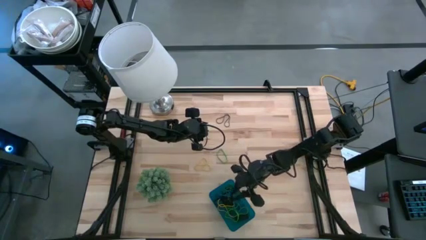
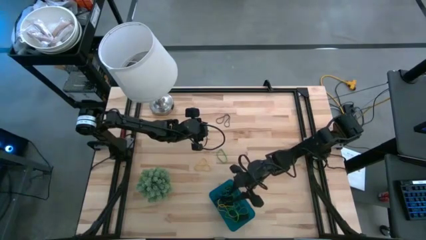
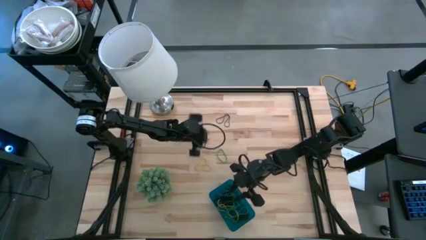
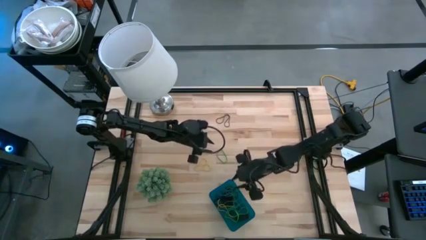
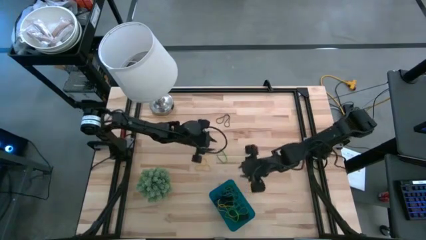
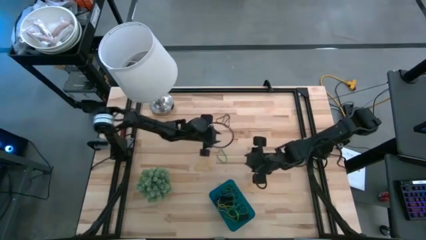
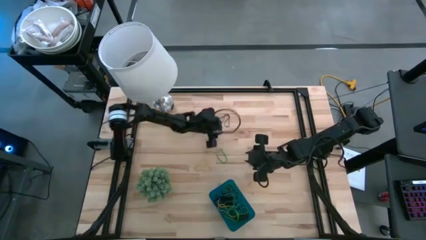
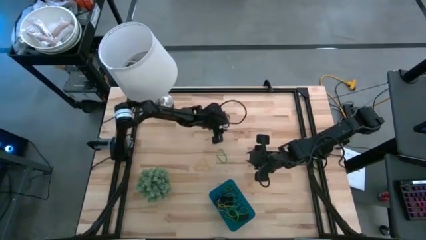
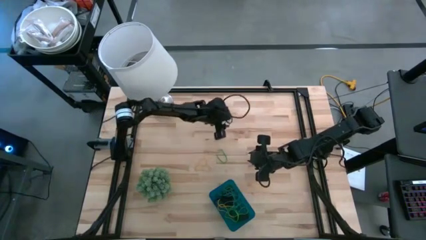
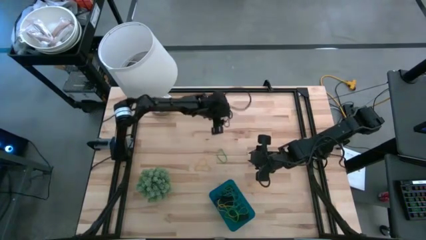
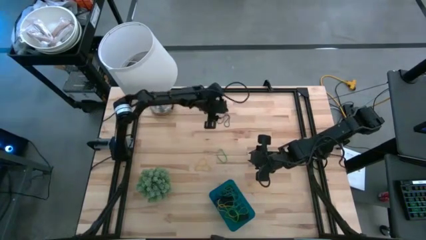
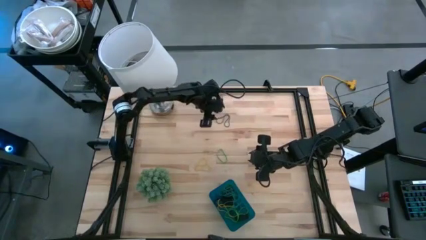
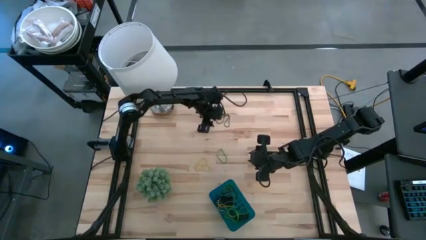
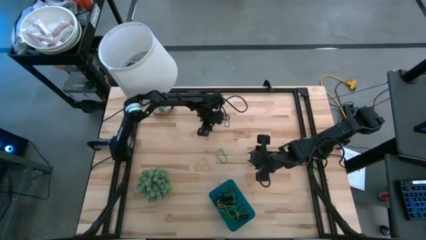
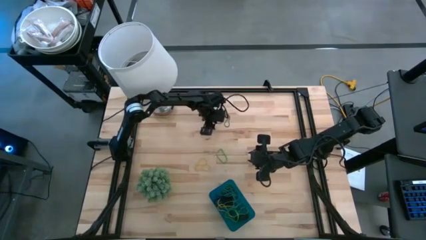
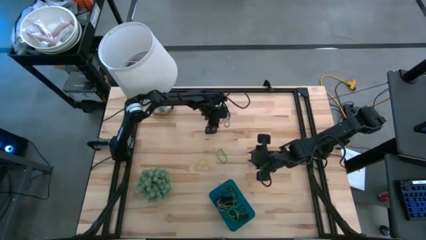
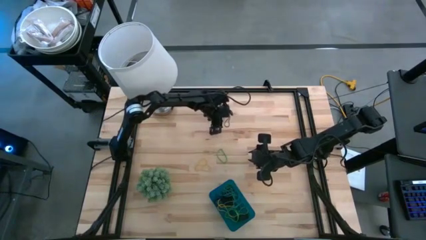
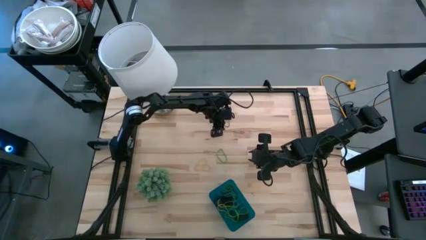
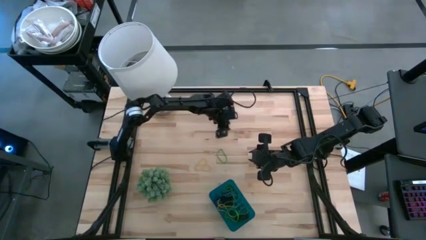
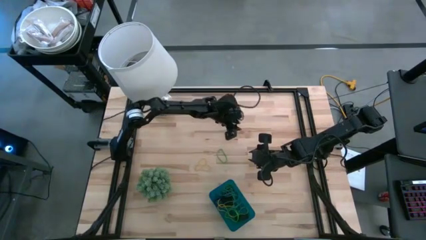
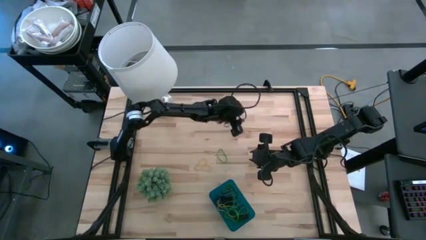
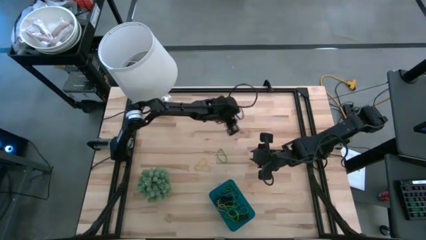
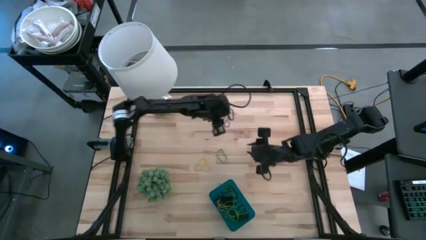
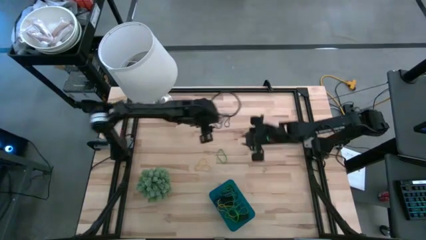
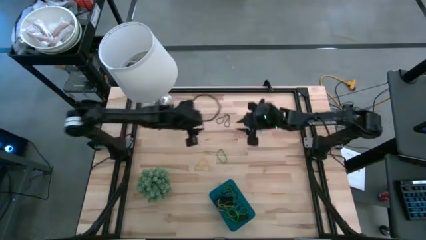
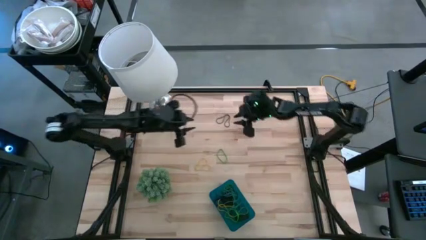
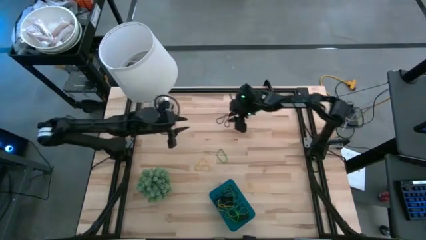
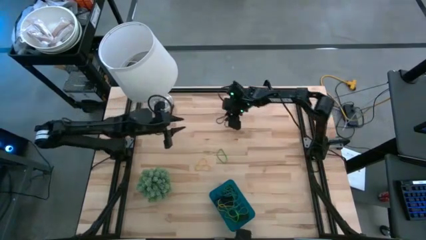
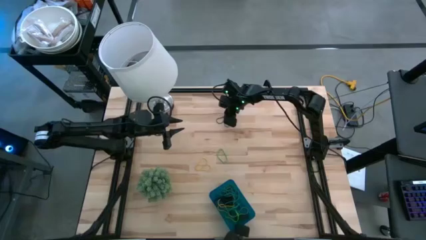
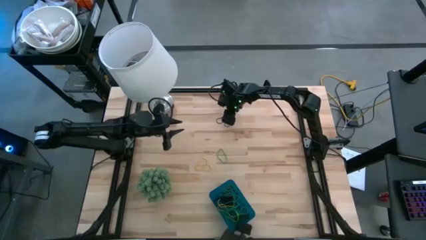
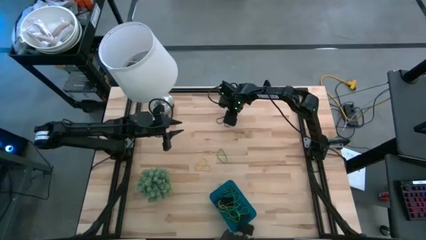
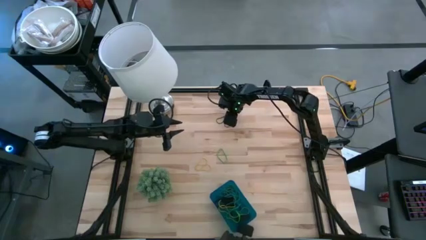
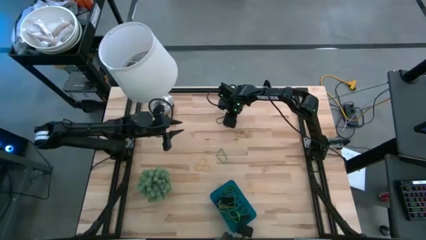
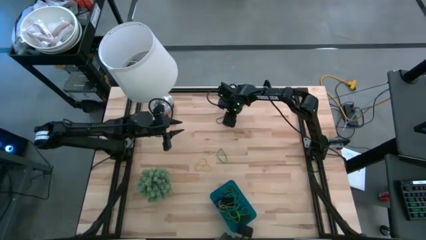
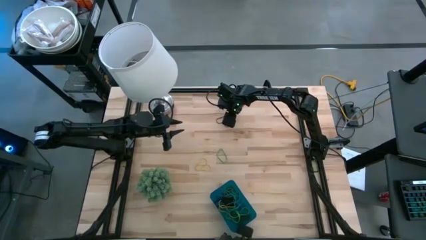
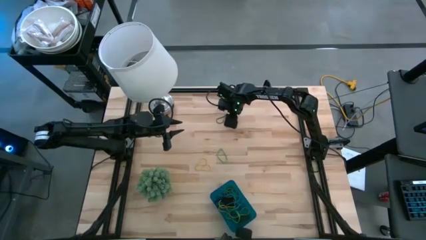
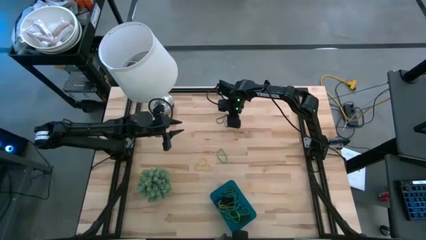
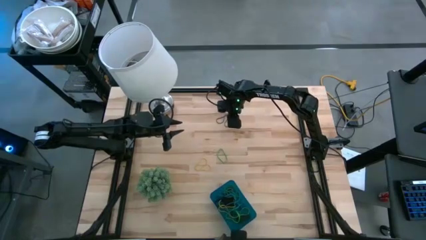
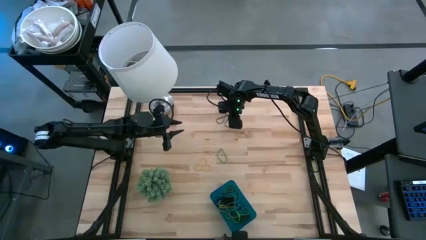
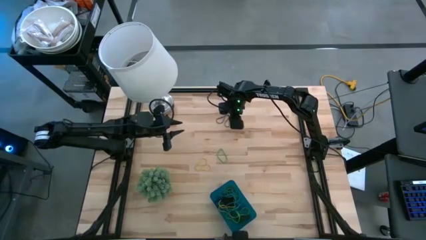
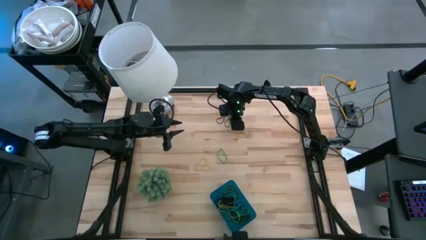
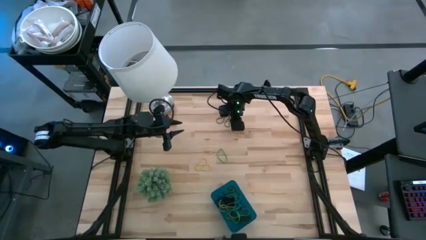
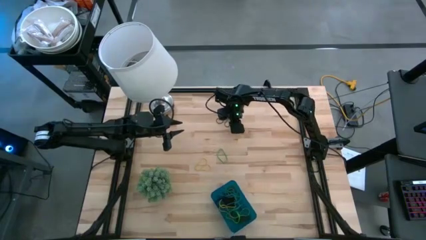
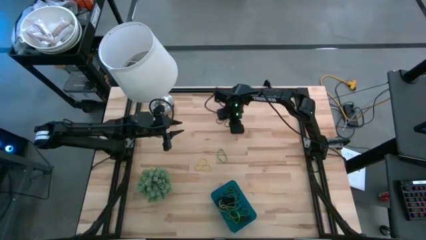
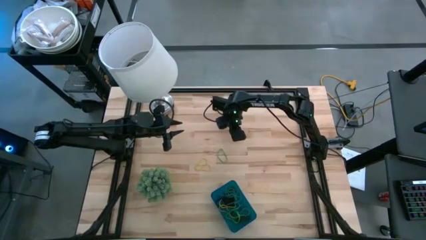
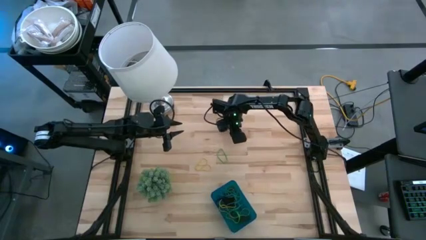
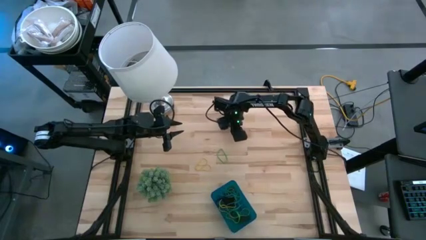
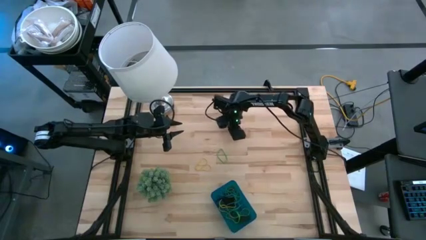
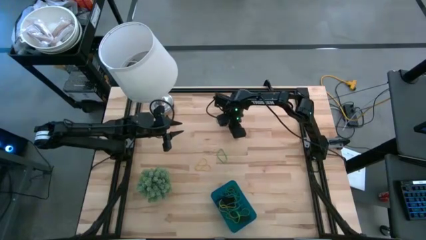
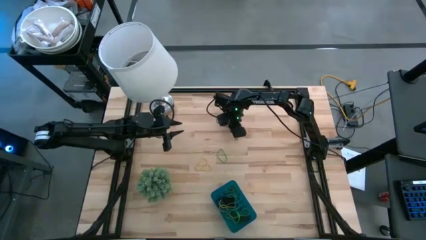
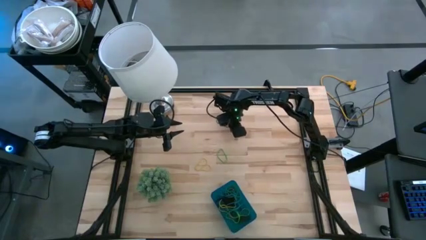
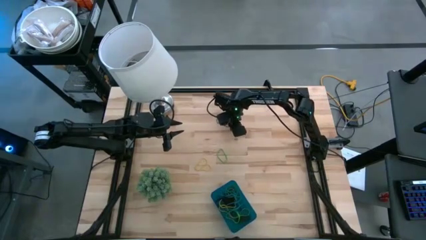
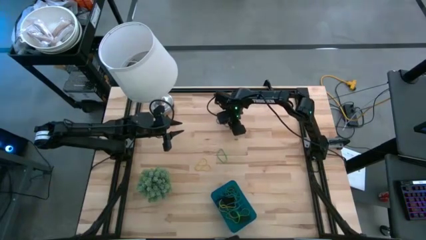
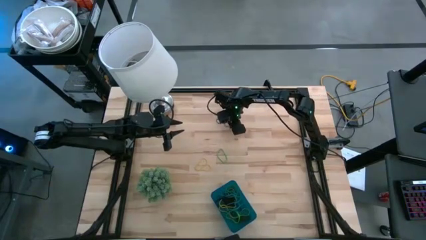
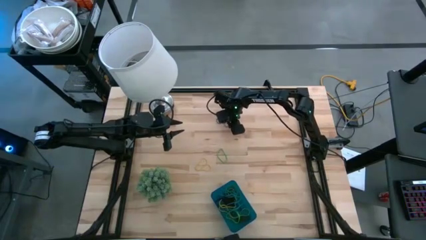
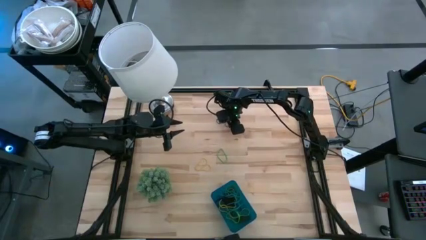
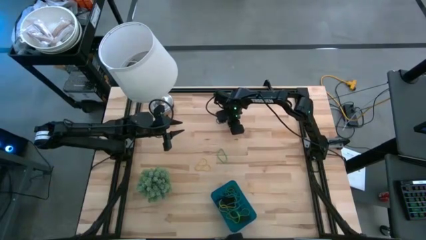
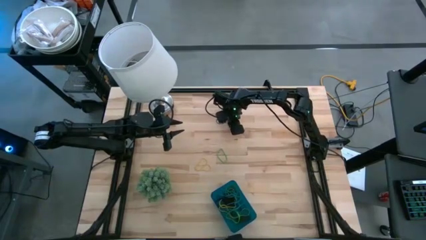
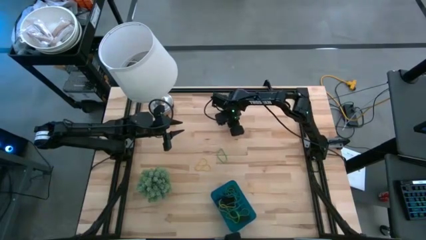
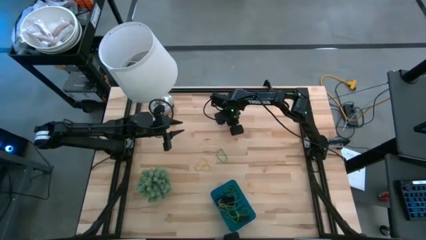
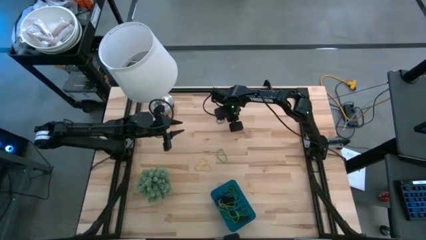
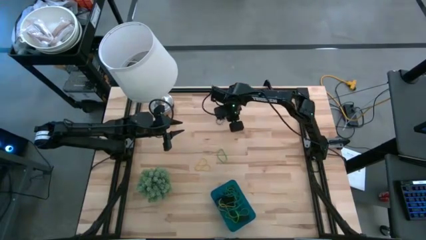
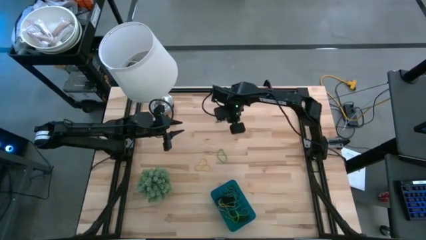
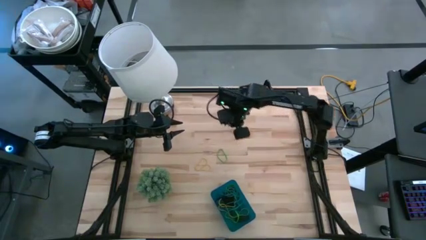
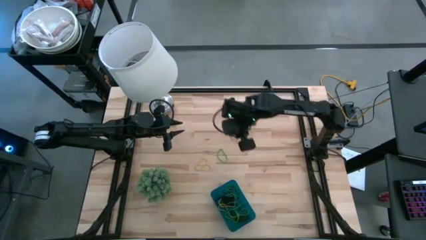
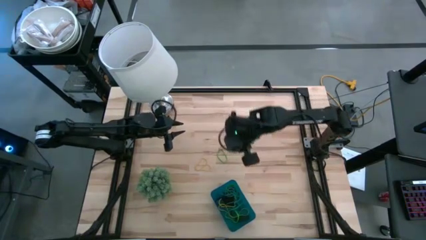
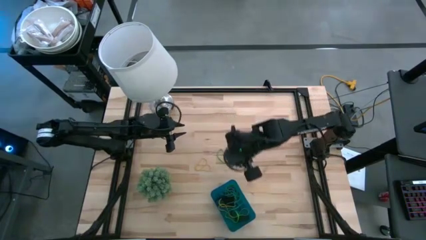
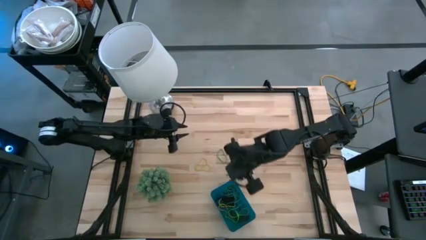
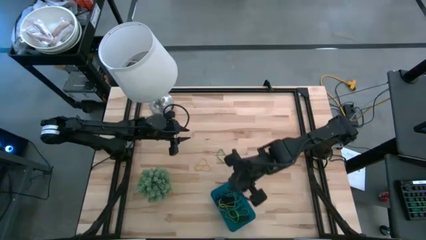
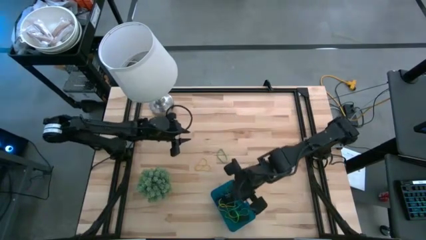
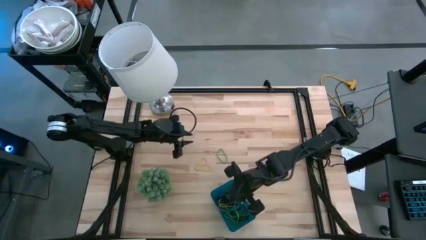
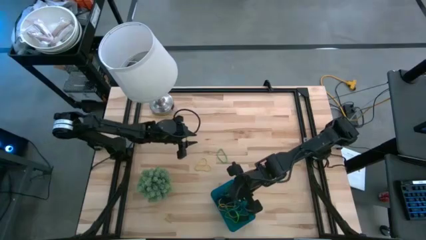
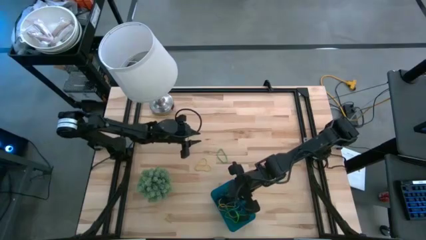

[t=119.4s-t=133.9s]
Task: Pick and place rubber bands into bin
Put the purple rubber band into the blue bin

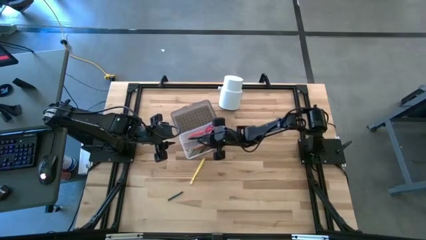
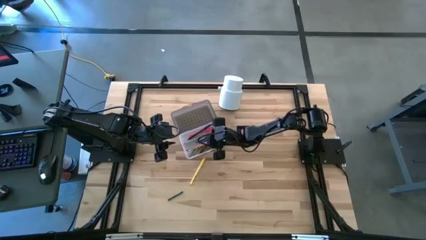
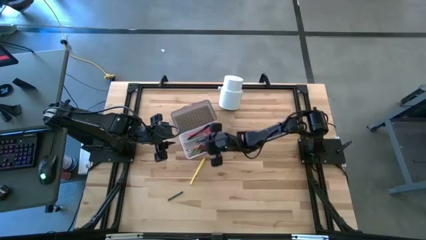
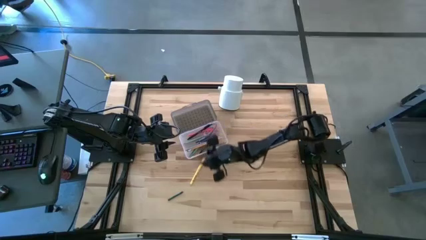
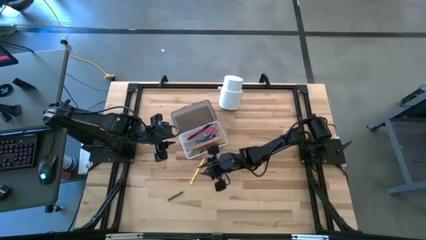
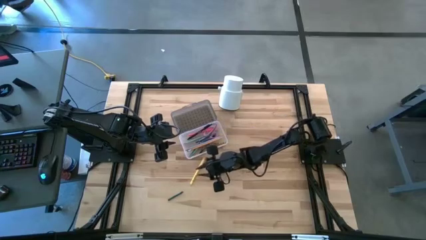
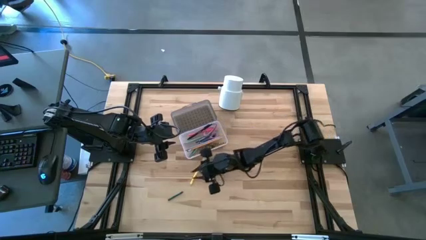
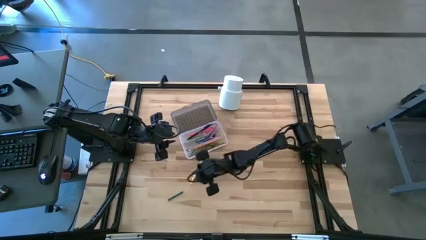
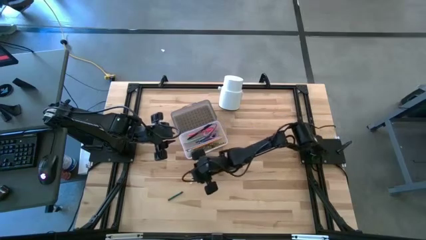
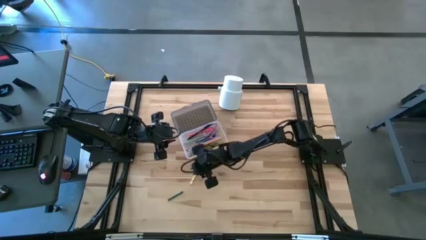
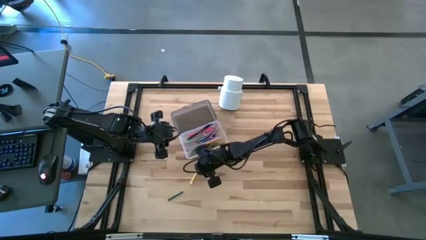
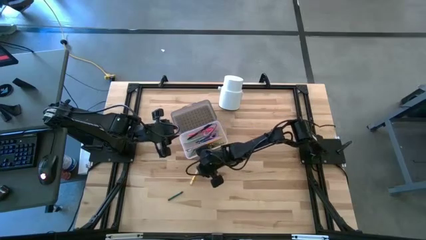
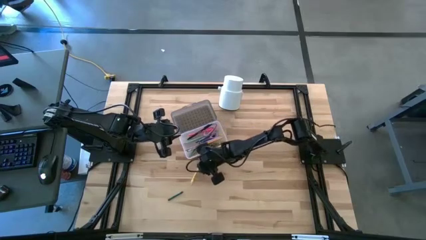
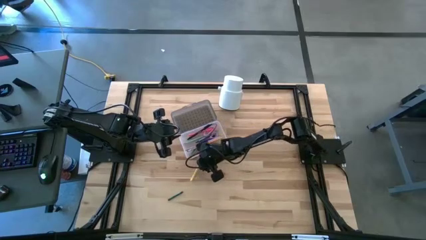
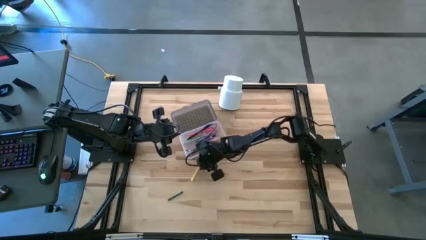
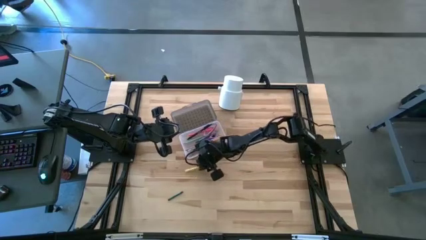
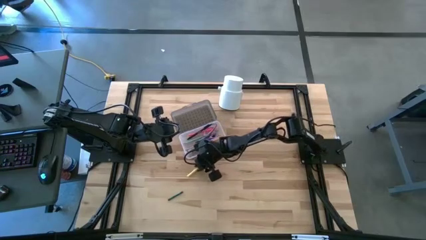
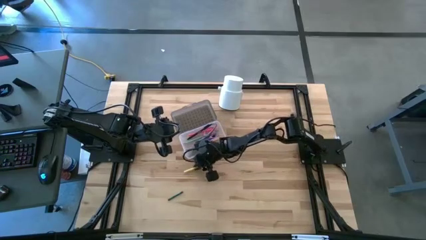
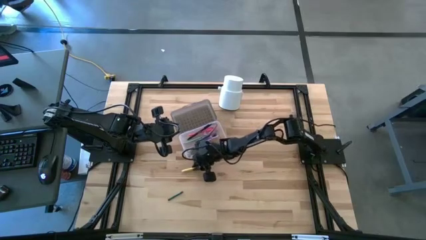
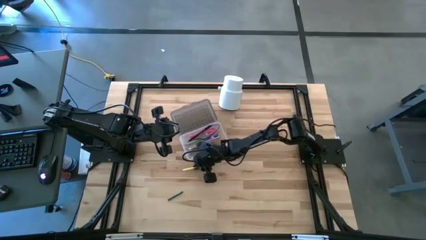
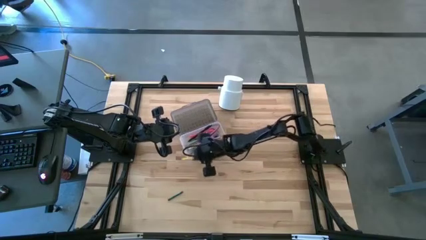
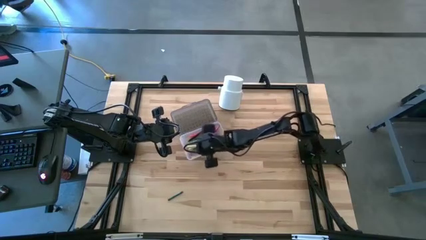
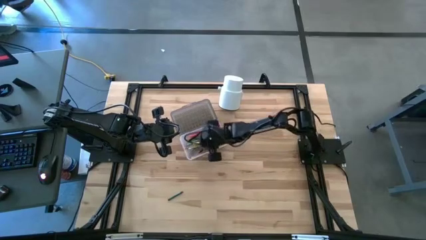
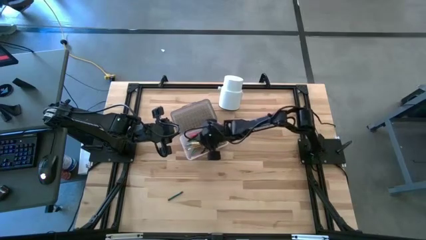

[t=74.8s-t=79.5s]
Task: Pick & place school supplies into a supply box
Put the yellow pen into the black supply box
